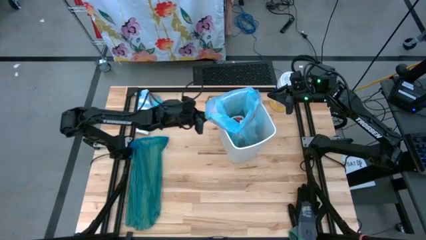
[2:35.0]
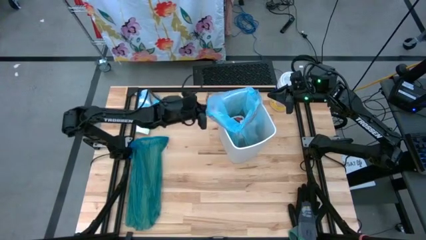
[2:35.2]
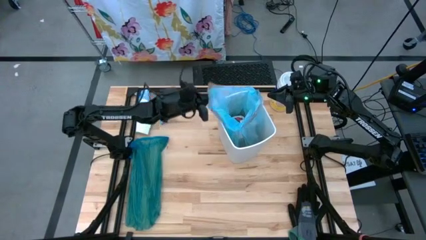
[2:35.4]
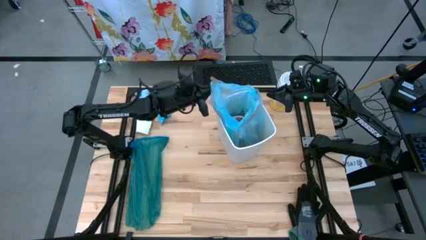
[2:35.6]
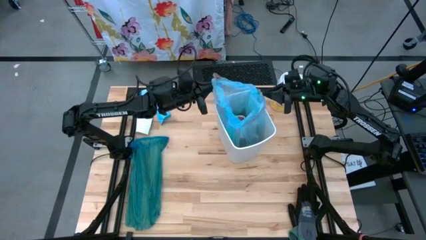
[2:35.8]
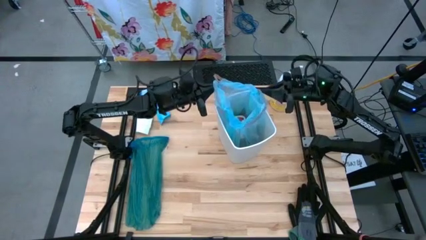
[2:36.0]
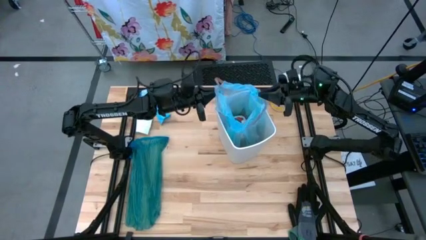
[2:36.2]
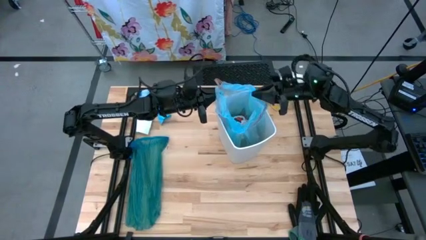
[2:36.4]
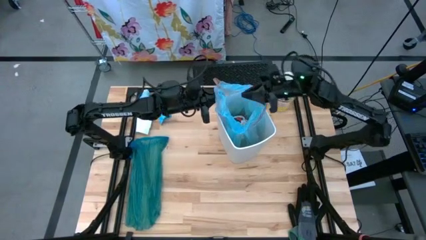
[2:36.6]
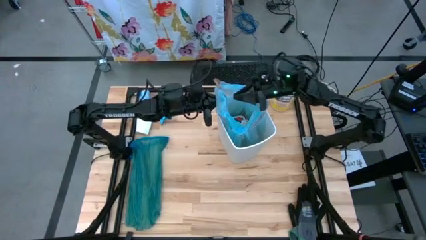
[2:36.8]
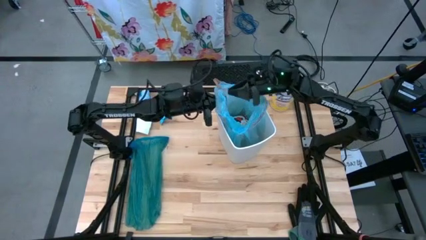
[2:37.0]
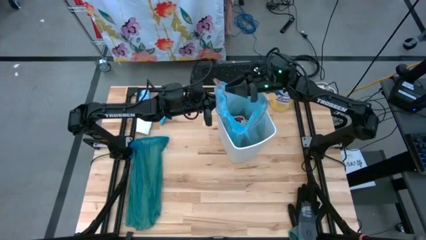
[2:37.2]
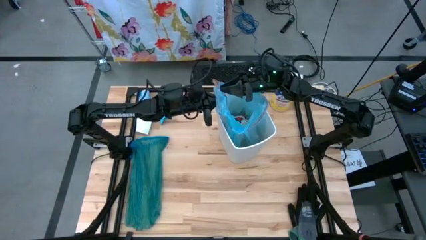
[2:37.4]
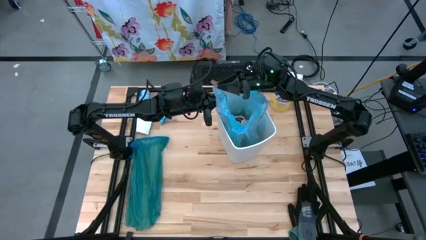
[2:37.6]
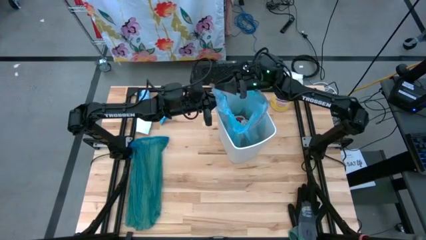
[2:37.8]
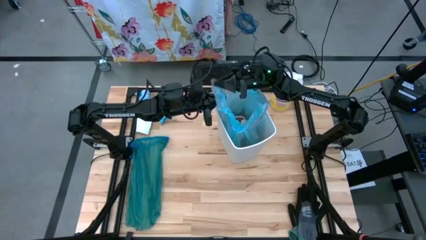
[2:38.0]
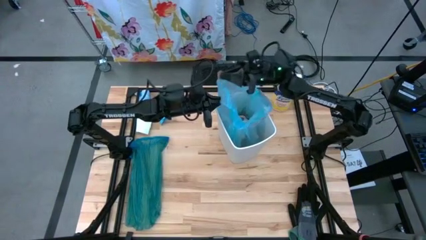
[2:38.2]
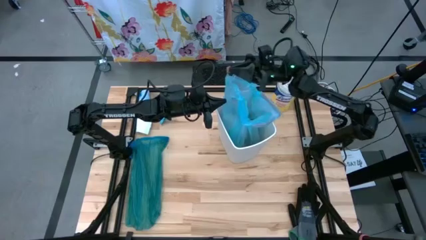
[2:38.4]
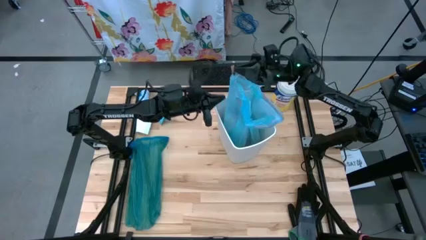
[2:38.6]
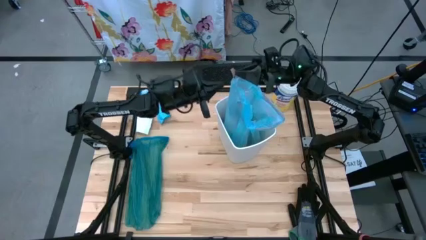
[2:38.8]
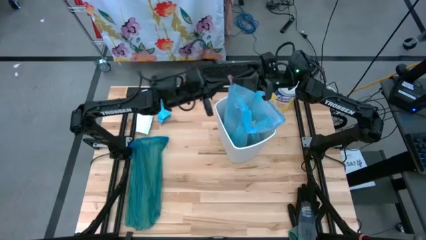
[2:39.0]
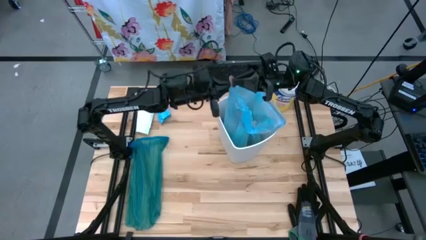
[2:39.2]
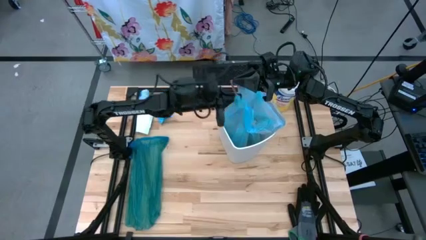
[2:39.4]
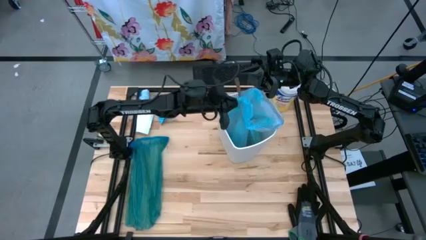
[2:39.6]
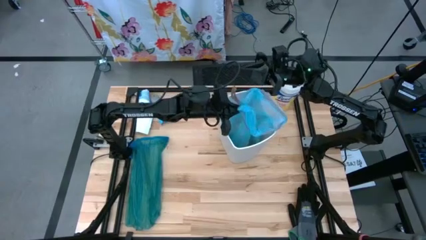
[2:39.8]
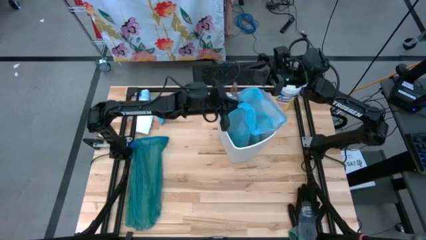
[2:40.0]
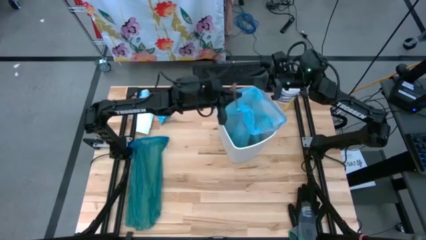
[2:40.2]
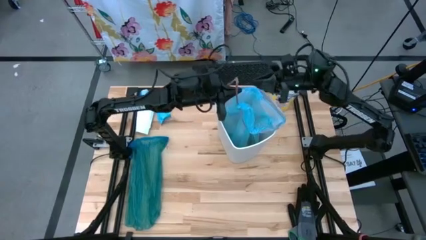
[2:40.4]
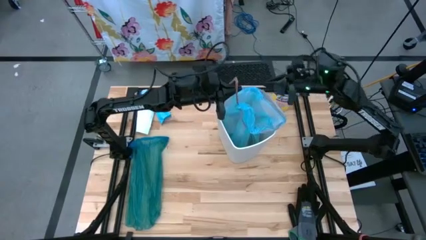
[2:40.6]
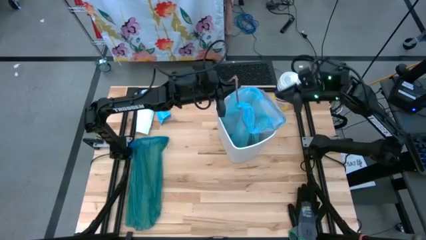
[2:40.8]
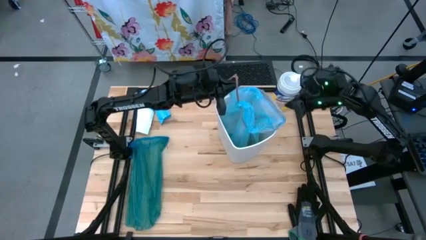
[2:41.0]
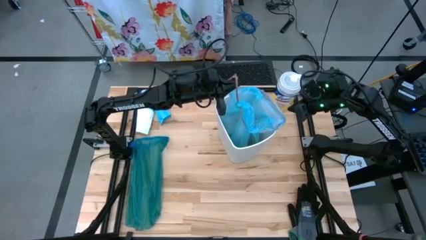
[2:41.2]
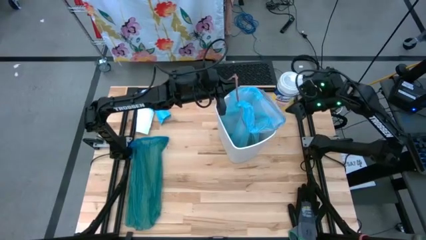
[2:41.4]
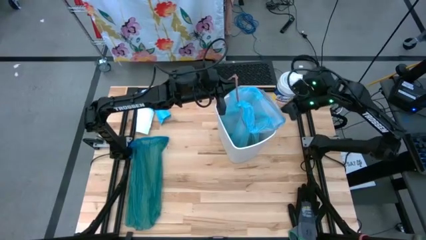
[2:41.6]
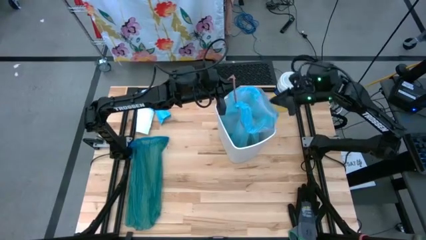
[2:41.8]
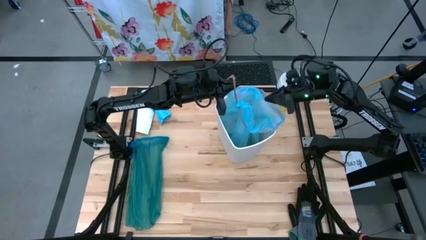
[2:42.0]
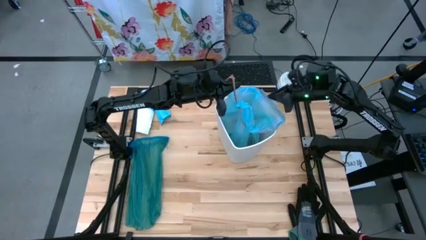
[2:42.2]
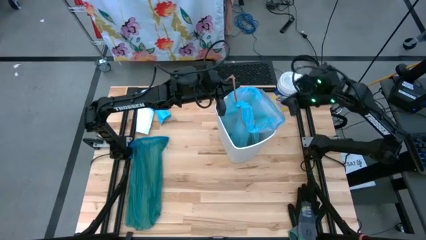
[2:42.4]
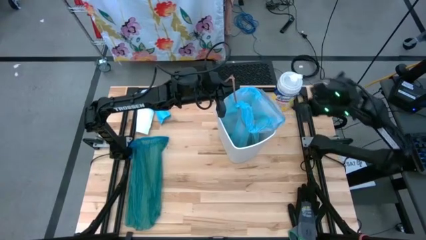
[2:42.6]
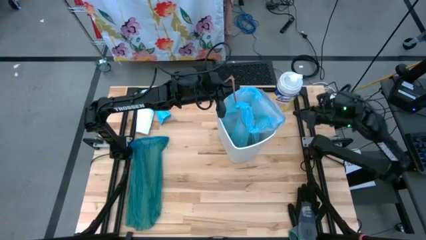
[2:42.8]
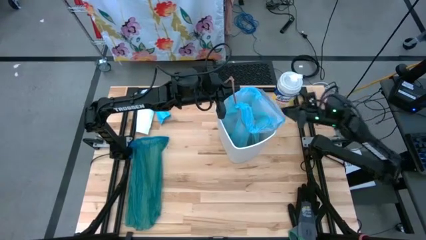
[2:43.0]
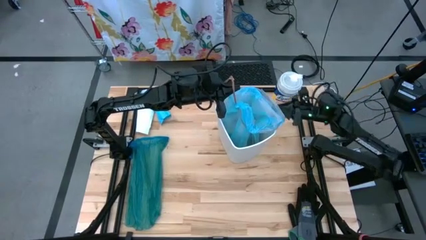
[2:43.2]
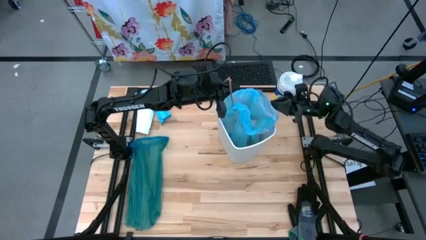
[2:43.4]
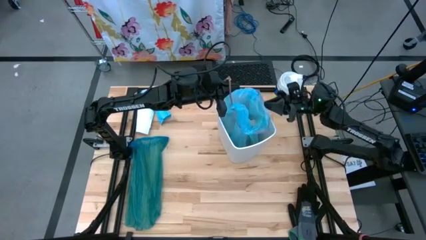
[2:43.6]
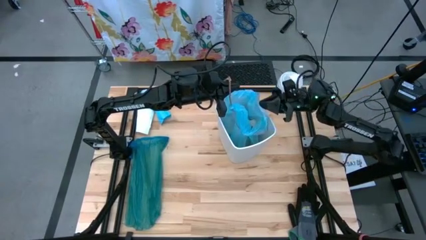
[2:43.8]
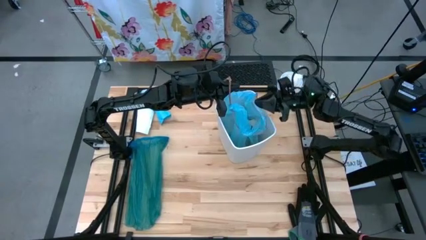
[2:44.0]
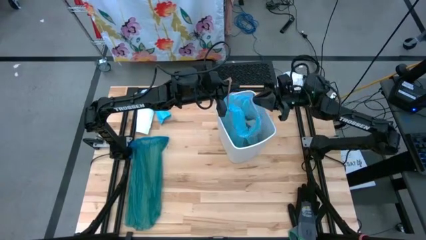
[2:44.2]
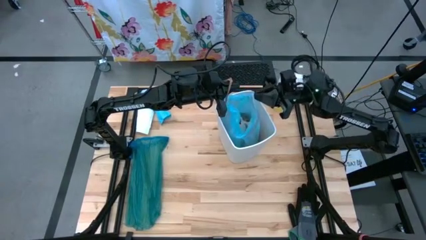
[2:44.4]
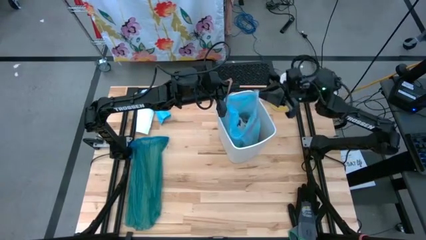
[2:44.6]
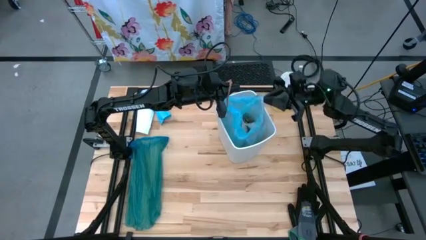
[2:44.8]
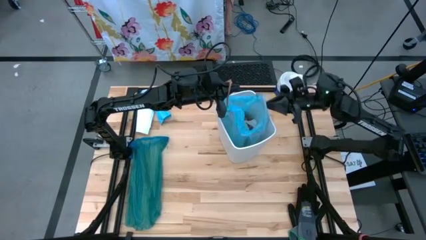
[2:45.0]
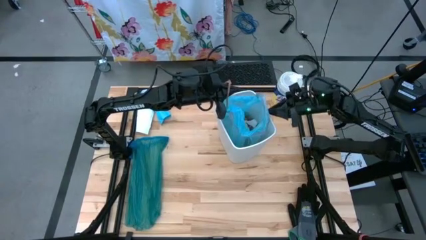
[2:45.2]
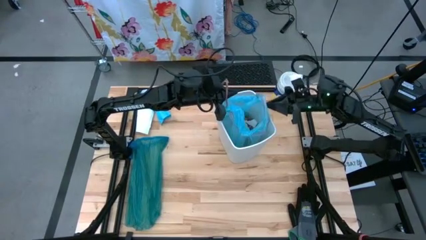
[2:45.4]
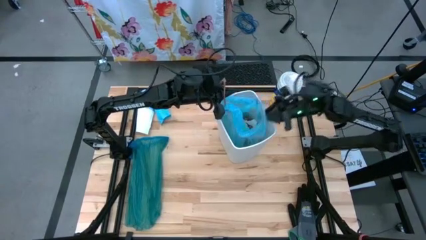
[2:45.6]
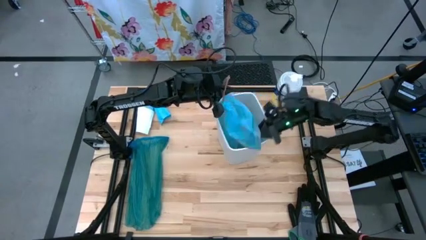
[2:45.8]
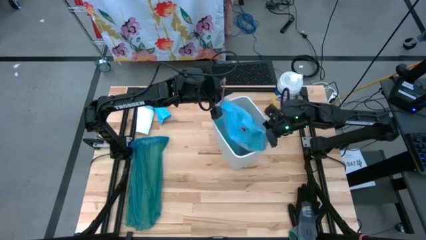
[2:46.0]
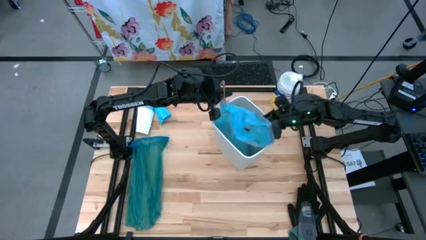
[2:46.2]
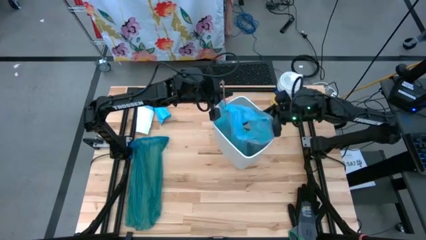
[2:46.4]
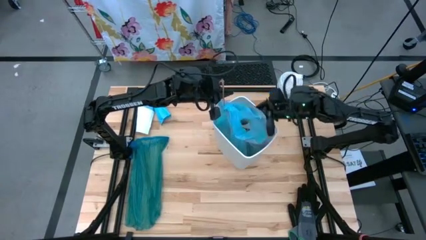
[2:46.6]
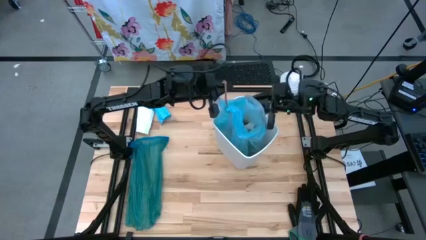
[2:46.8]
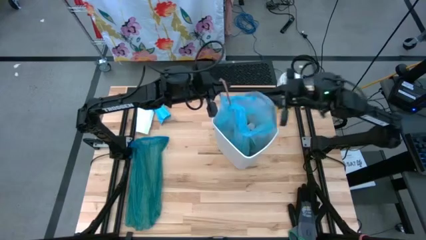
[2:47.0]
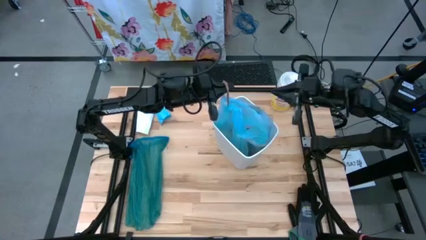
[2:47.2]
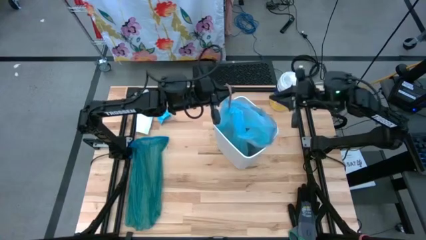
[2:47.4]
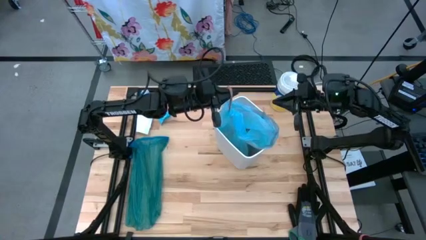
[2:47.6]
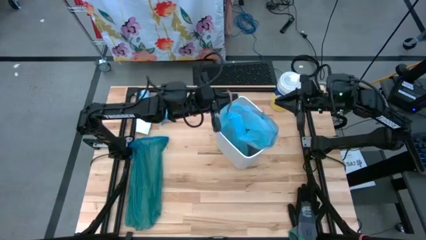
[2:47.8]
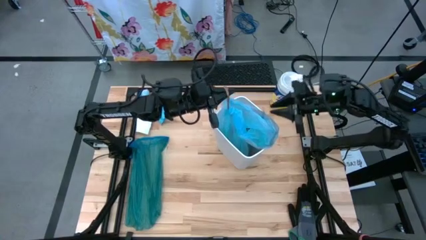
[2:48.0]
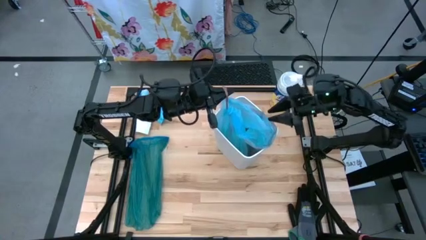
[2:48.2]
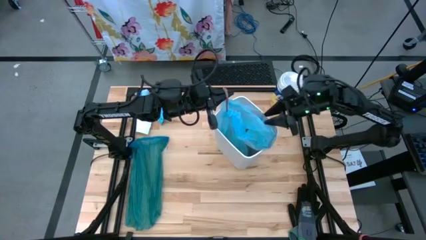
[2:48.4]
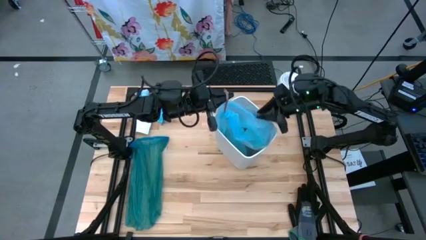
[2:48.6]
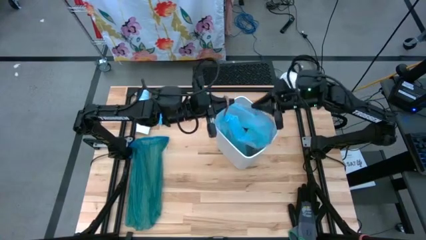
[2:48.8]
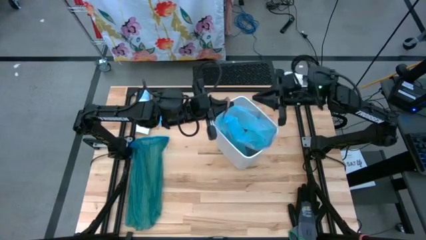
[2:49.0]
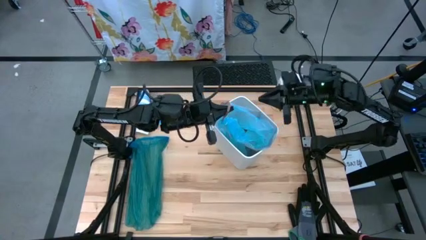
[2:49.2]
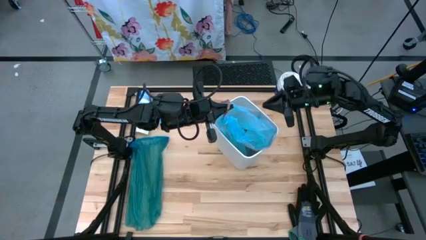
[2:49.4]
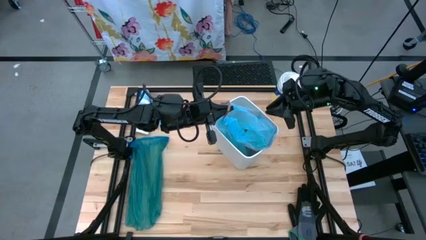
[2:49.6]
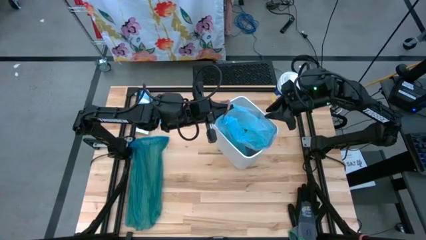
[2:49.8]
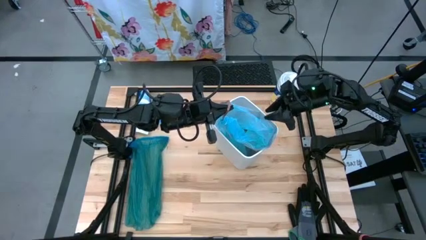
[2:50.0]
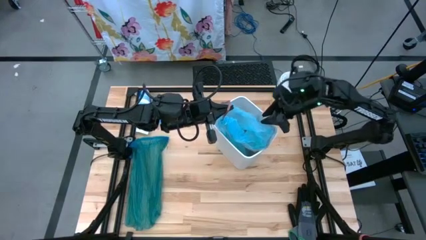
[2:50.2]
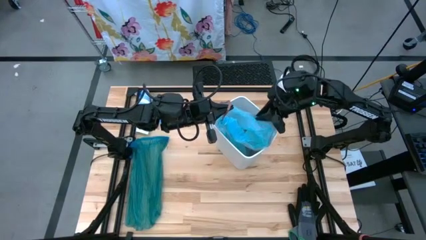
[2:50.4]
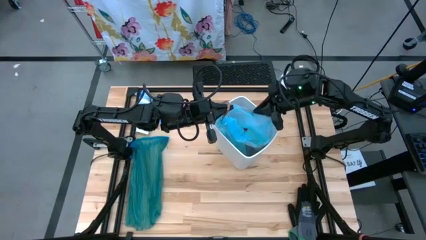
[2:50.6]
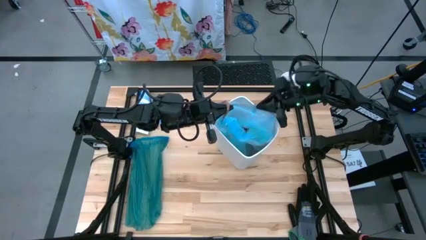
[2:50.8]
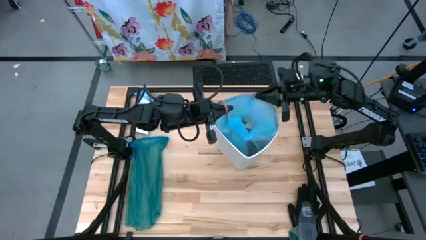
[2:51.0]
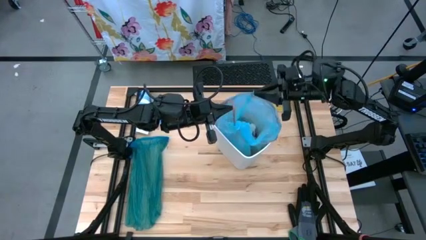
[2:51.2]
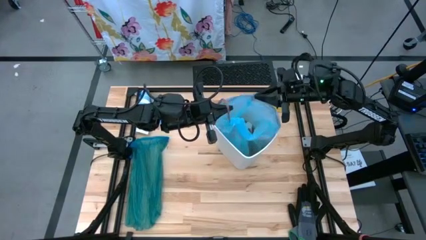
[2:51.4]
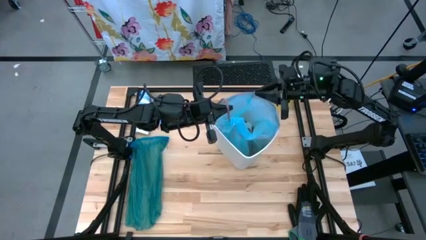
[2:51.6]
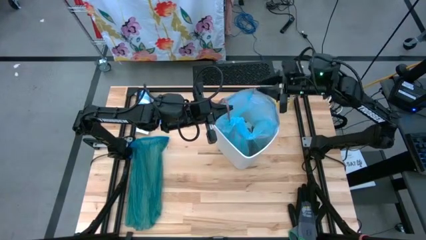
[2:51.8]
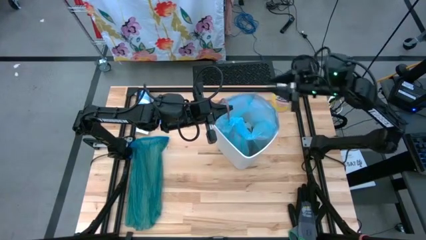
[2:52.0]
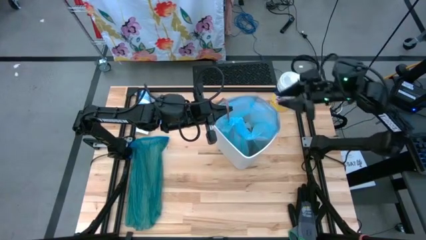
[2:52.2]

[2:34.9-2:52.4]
Task: place trash/remove bag and relplace
Close the blue trash bag
